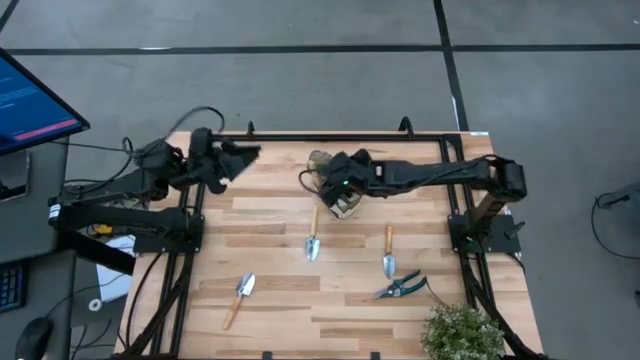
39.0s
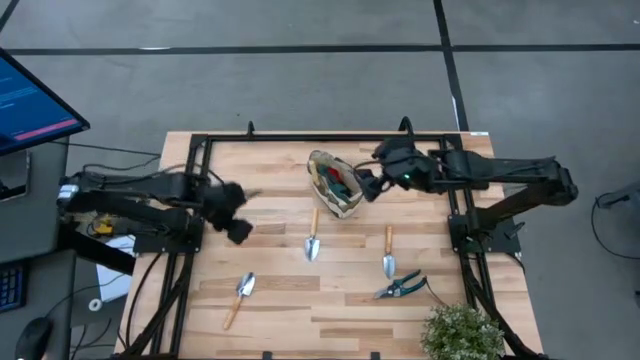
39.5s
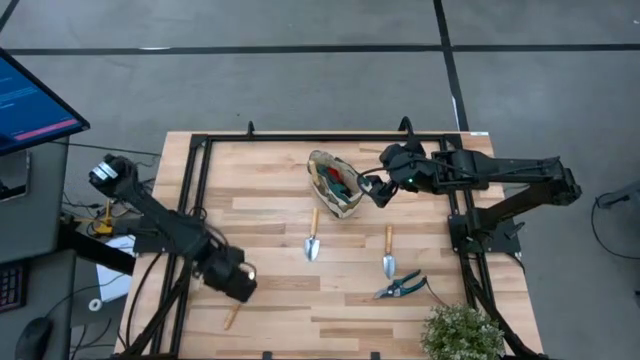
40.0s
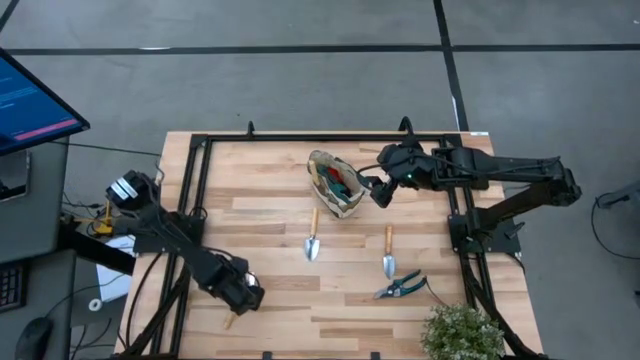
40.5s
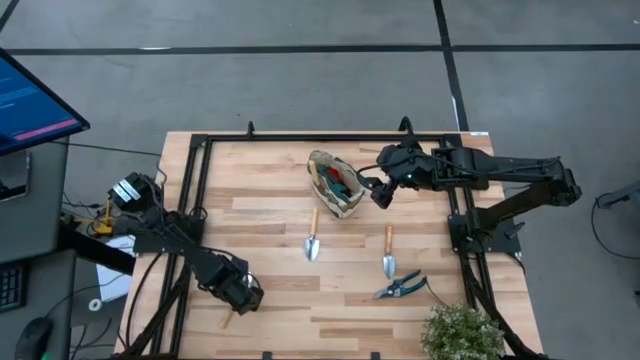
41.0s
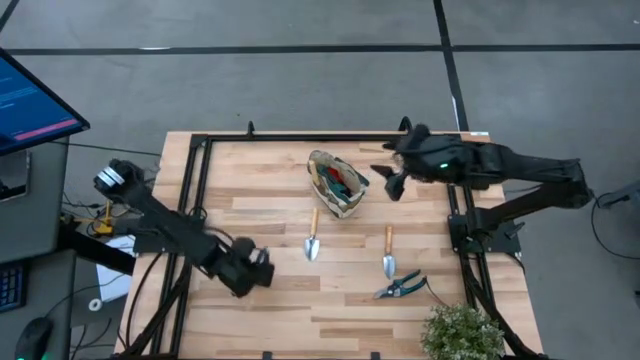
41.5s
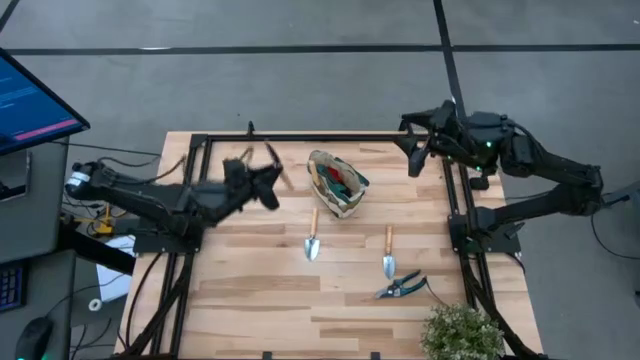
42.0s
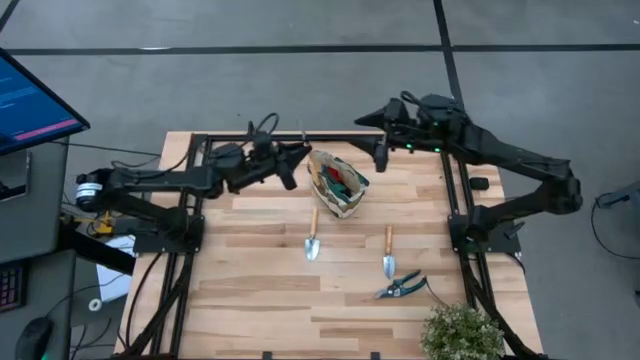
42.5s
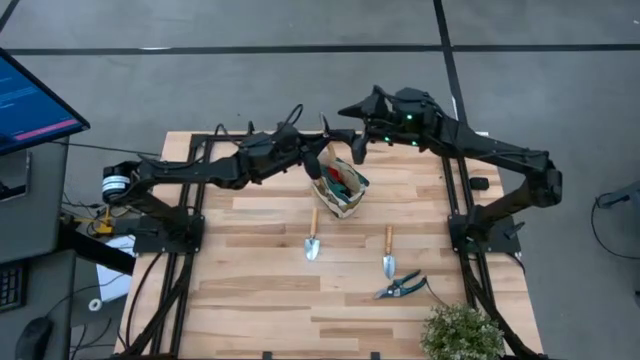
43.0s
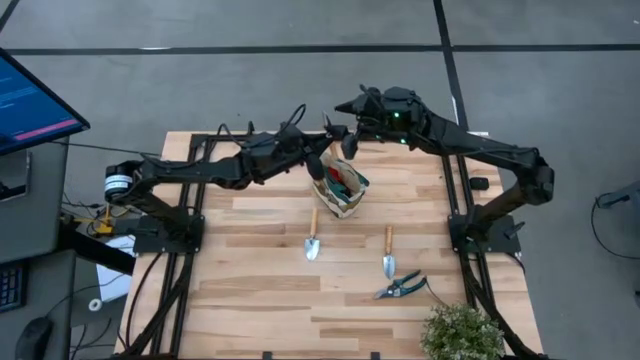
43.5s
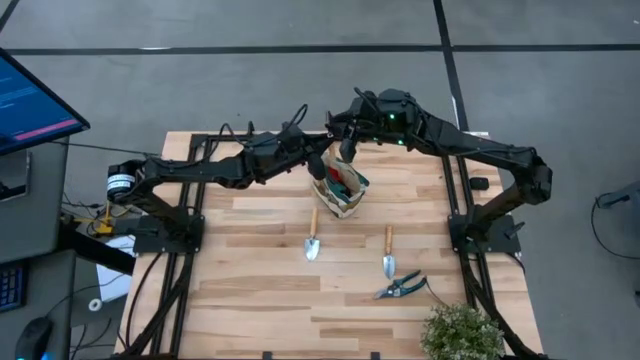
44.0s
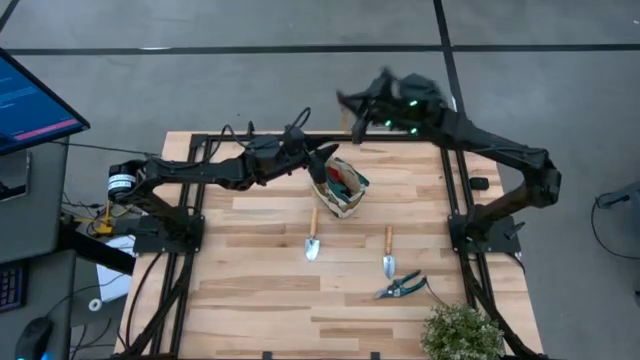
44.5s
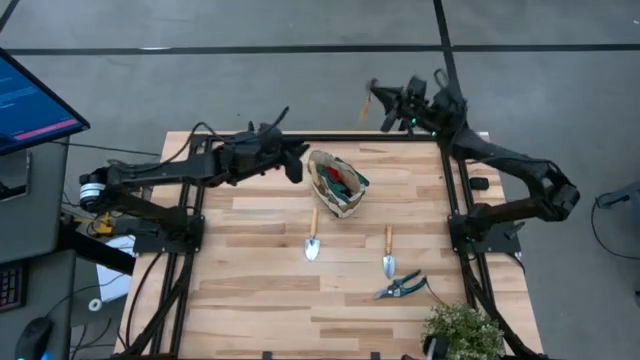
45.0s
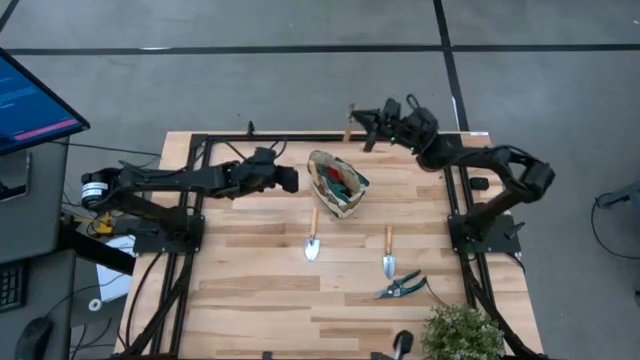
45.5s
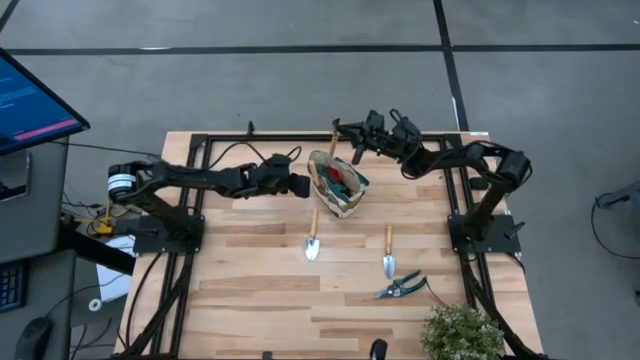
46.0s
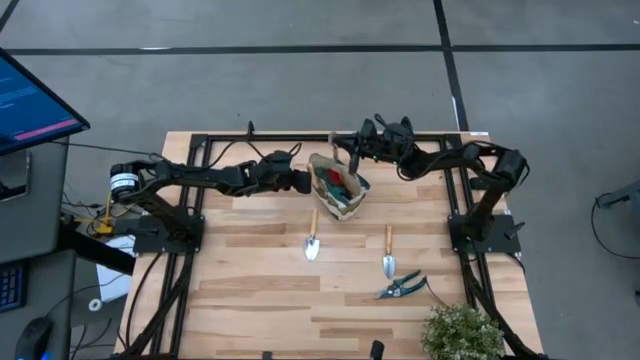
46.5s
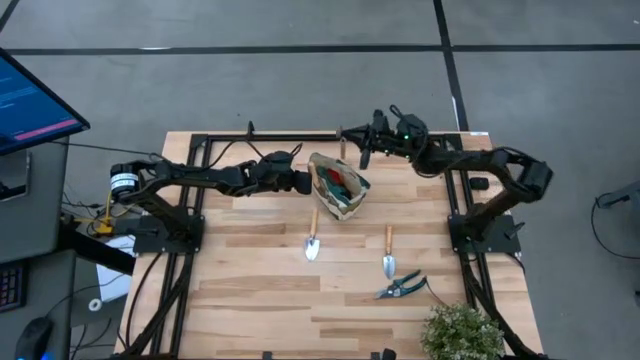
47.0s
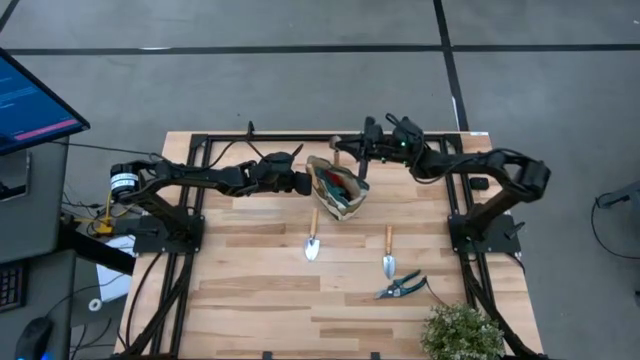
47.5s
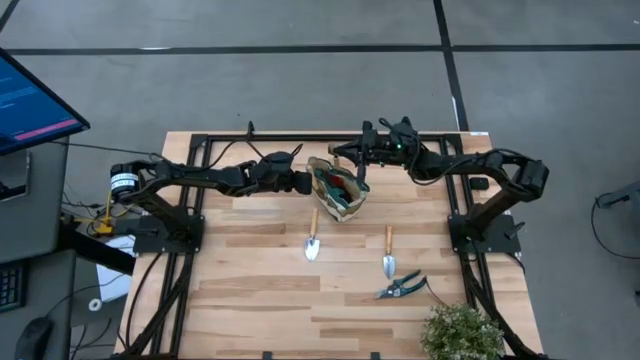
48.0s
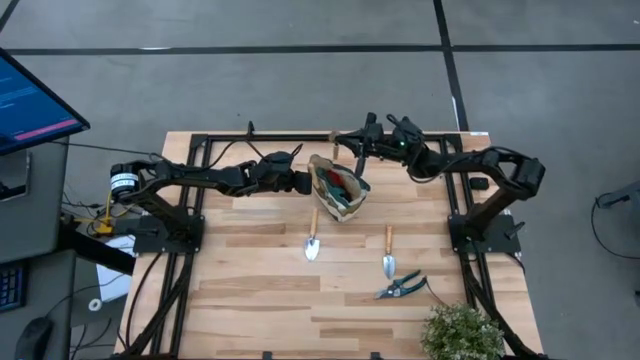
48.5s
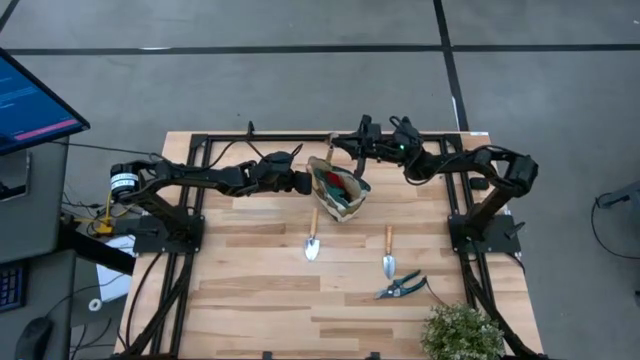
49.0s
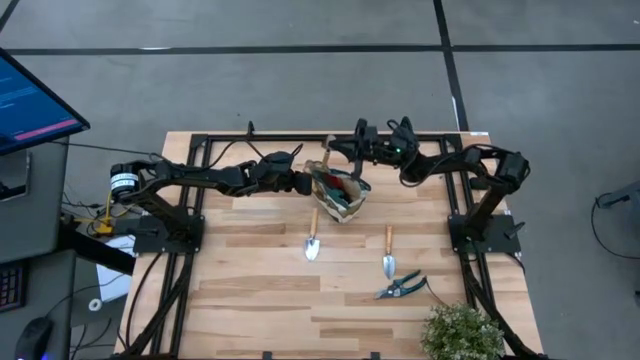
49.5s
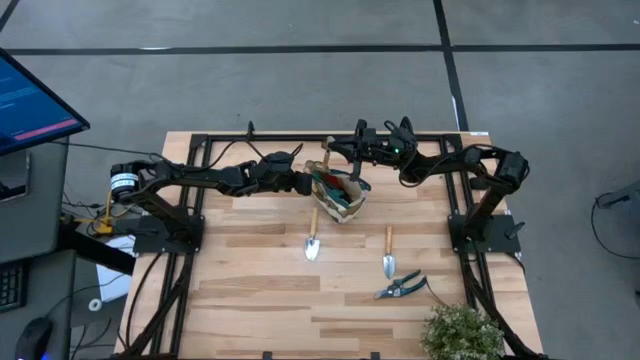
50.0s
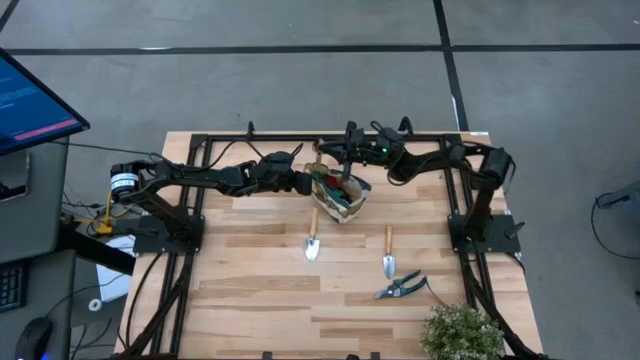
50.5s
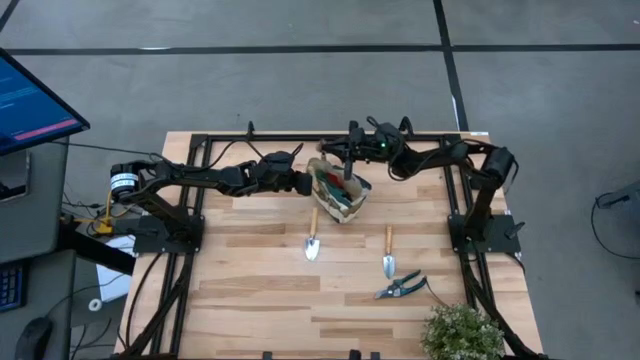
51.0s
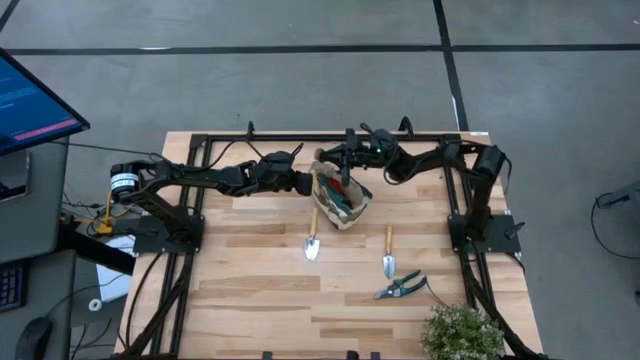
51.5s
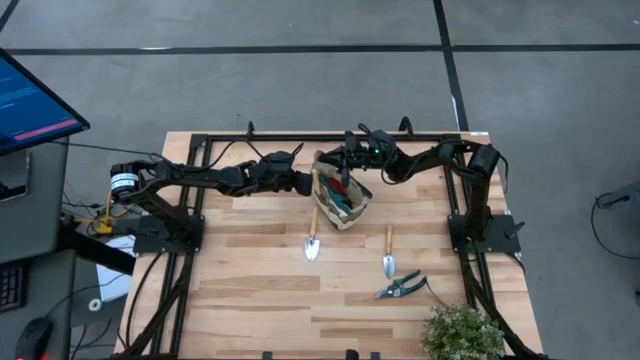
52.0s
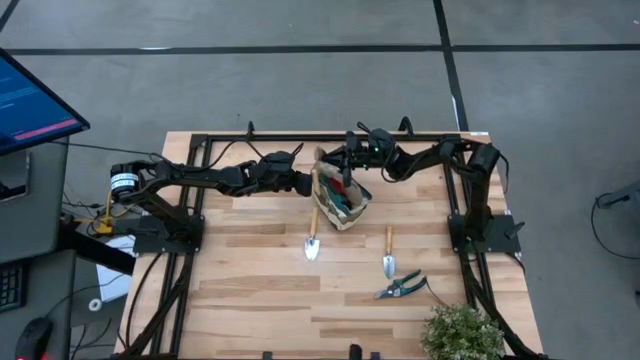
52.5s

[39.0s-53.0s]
Task: Pick & Place Garden tools in Gardening bag
Put the brown trowel into the gardening bag

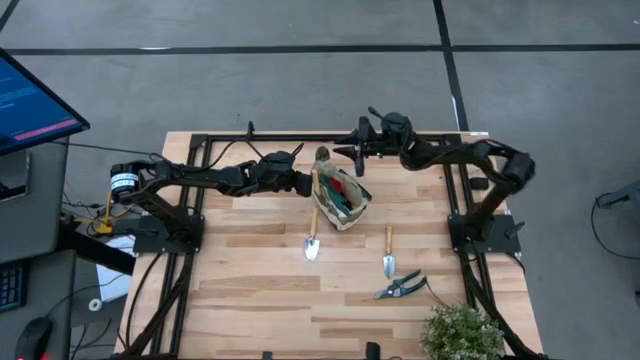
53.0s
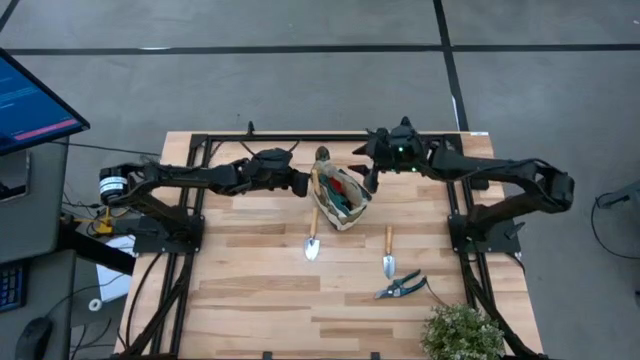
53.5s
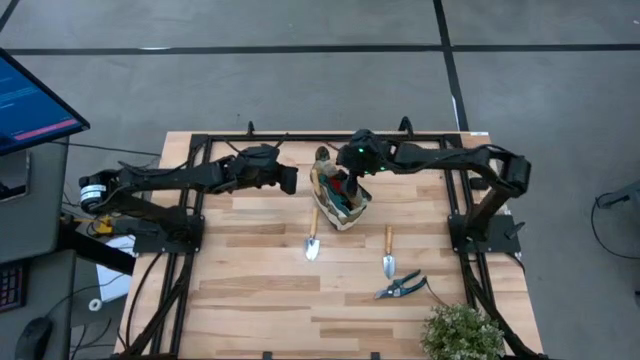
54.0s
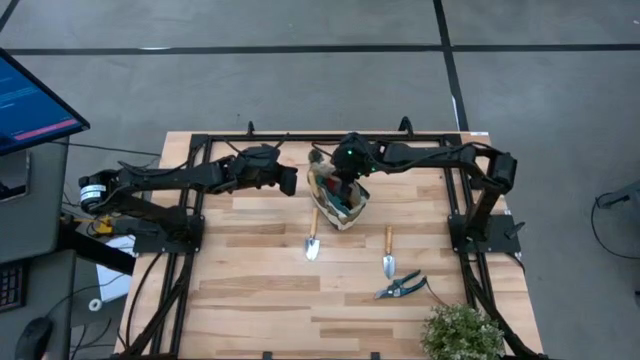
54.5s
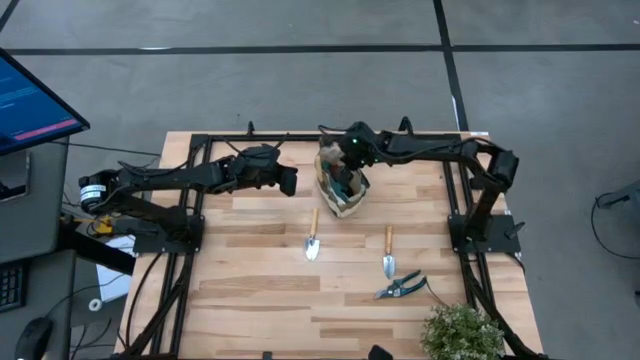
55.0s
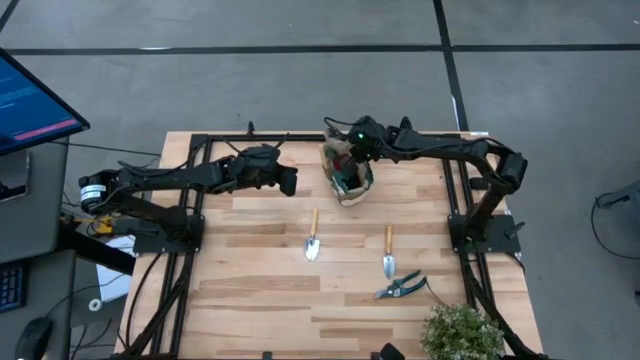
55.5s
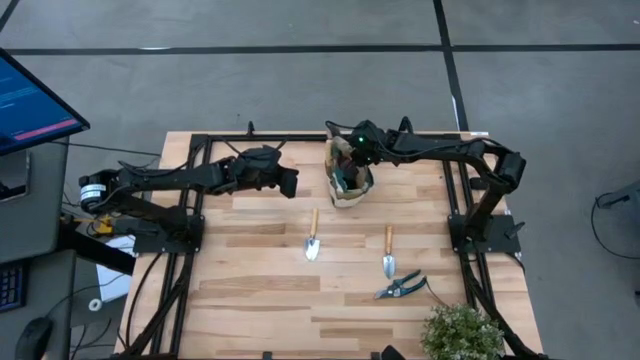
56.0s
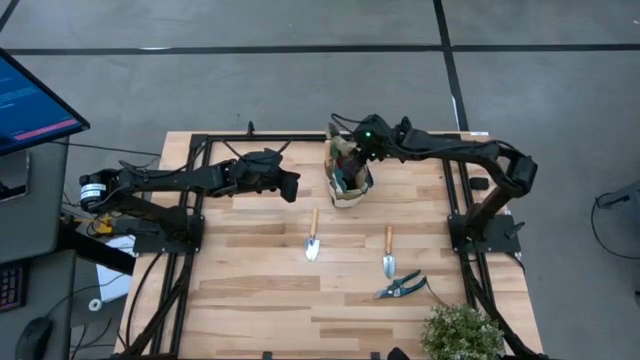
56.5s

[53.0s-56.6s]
Adjust the gardening bag

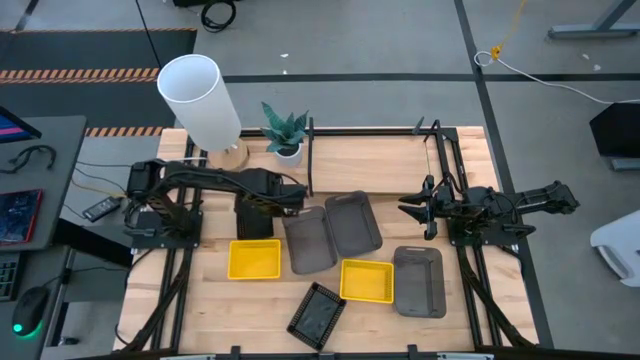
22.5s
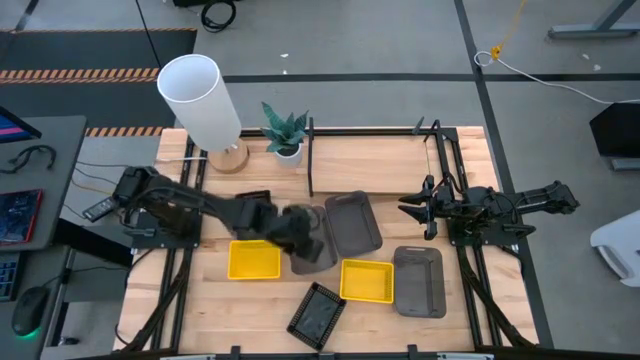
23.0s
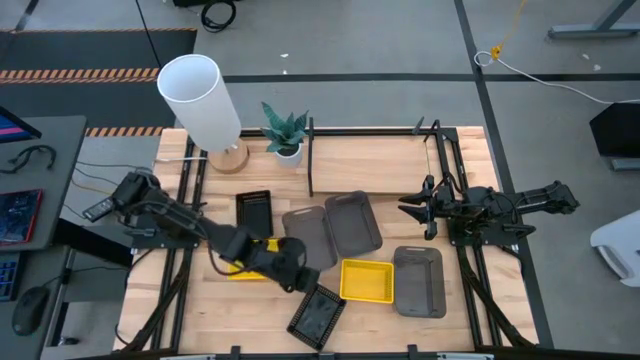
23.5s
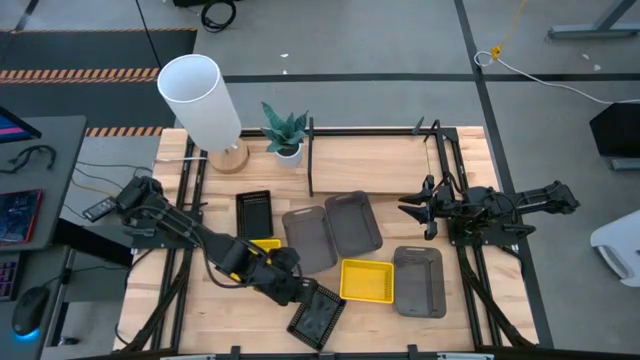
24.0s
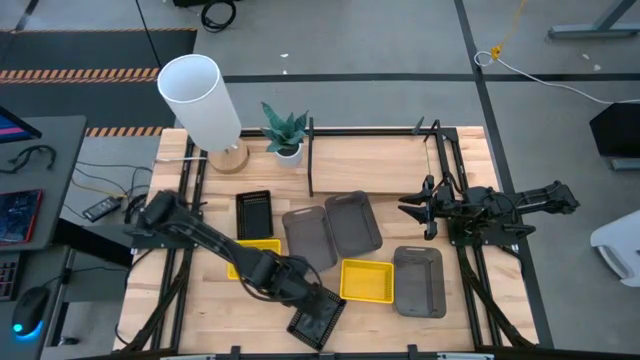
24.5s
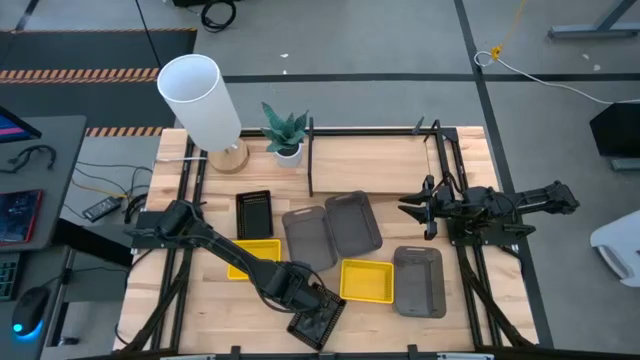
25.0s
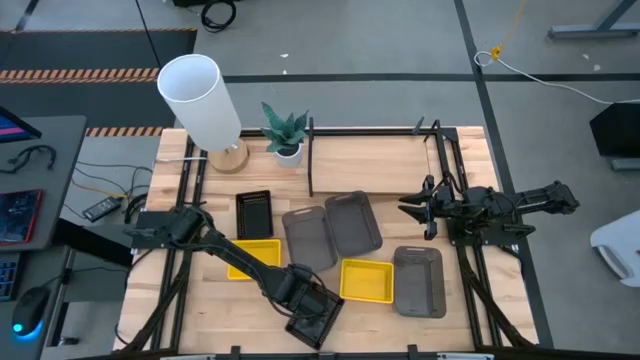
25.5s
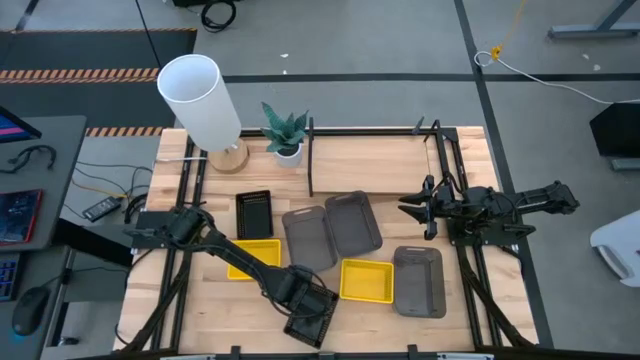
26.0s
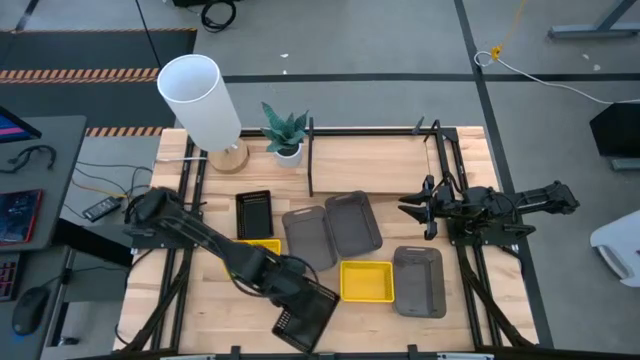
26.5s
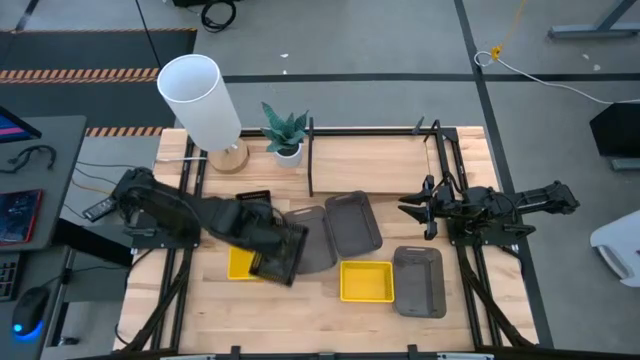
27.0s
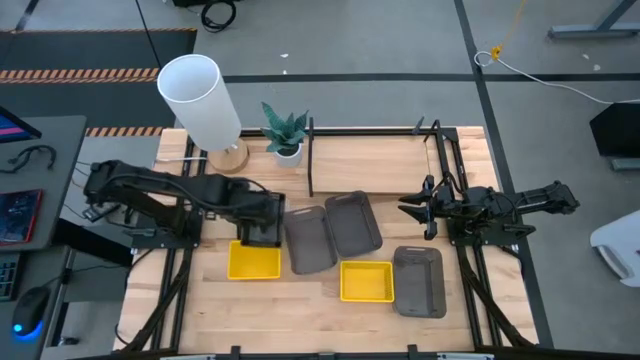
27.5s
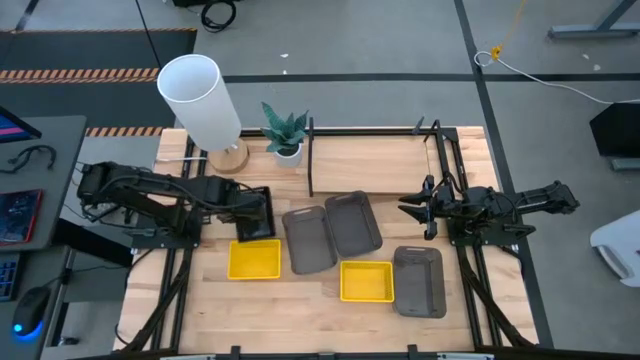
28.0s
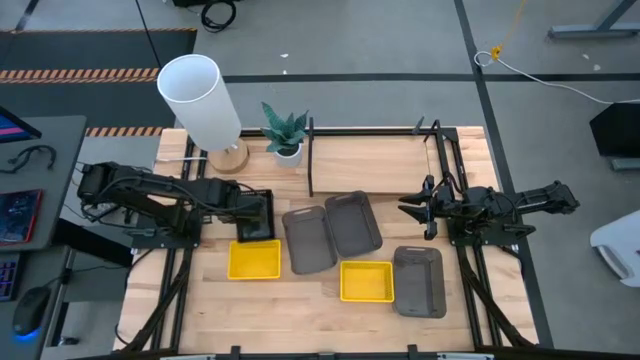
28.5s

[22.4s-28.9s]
Task: Stack baskets on shelf by color
Stack the bottom black bin on the stacked black bins
